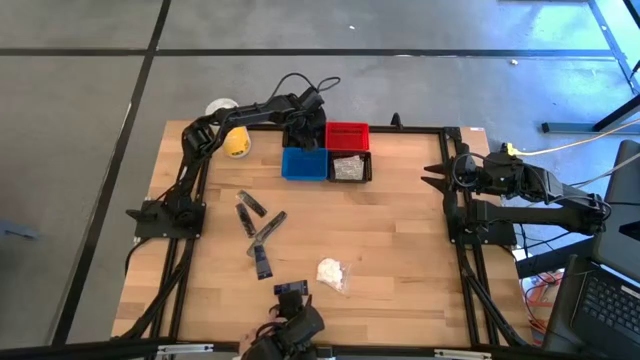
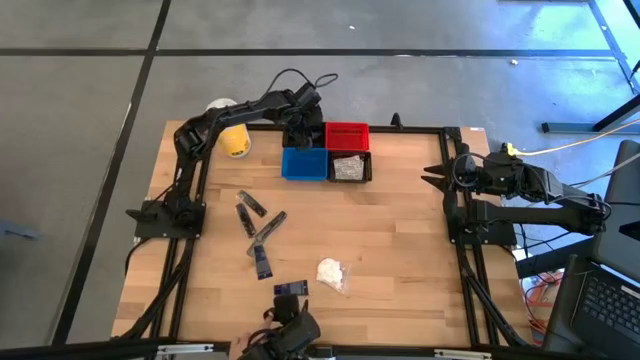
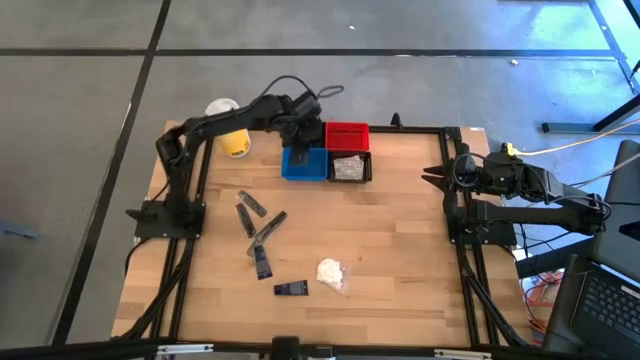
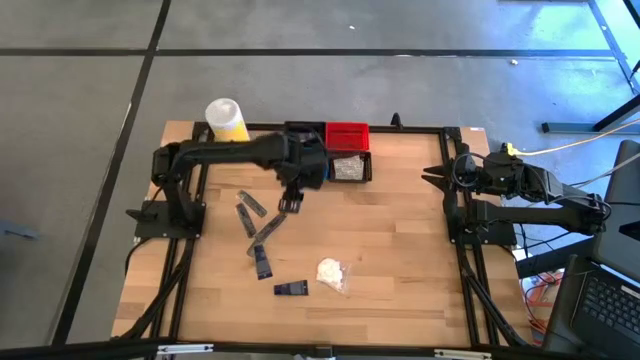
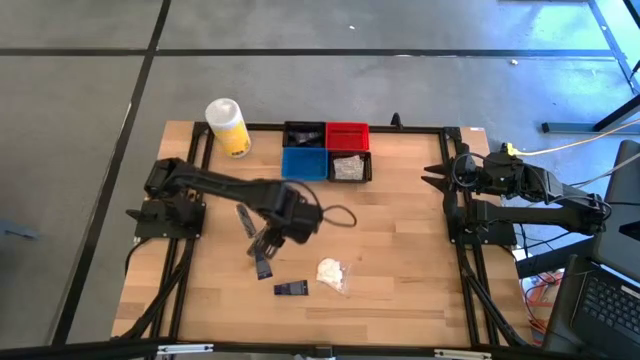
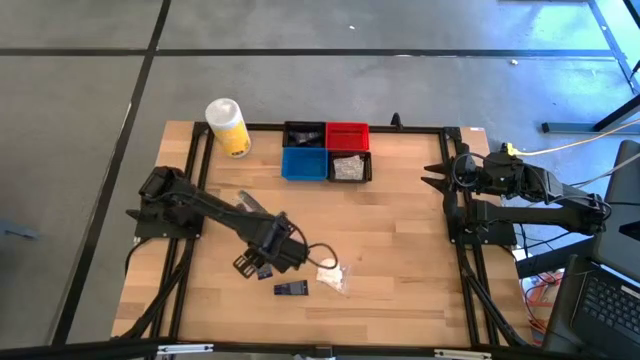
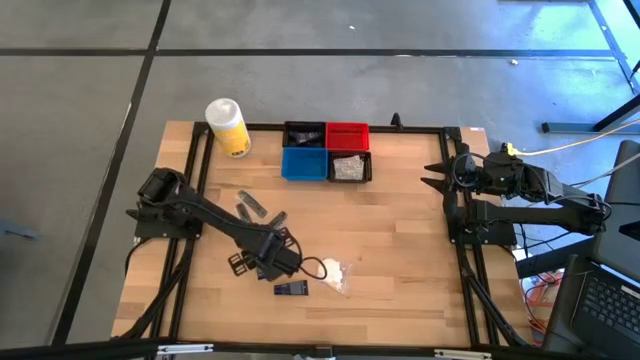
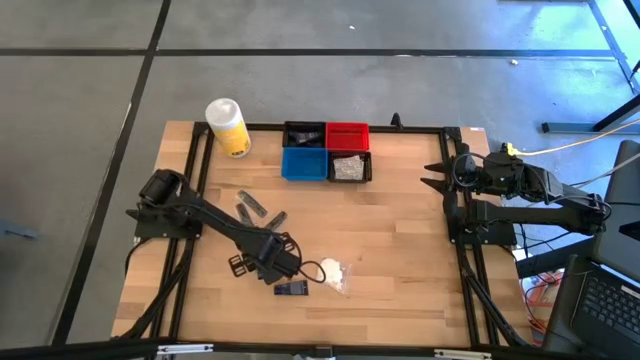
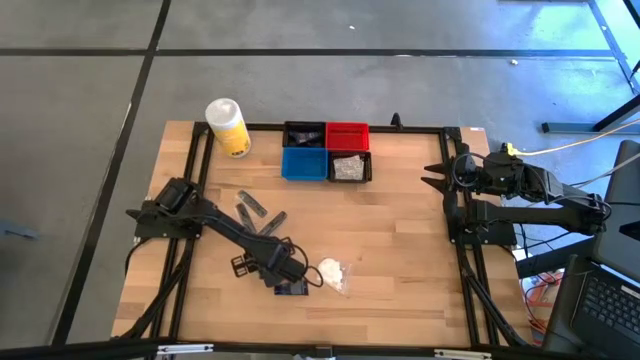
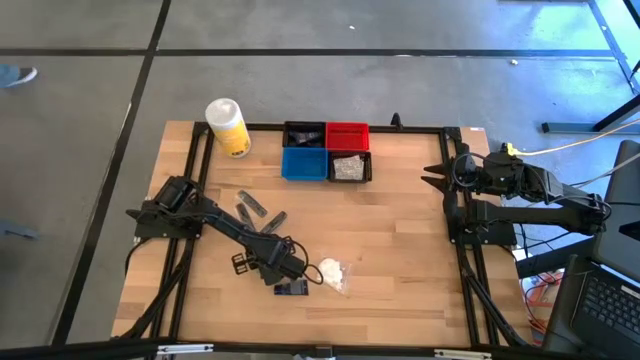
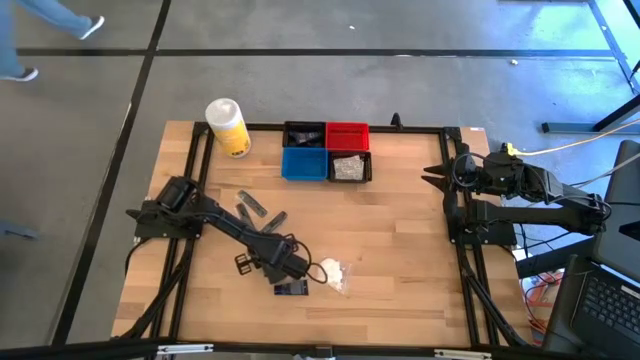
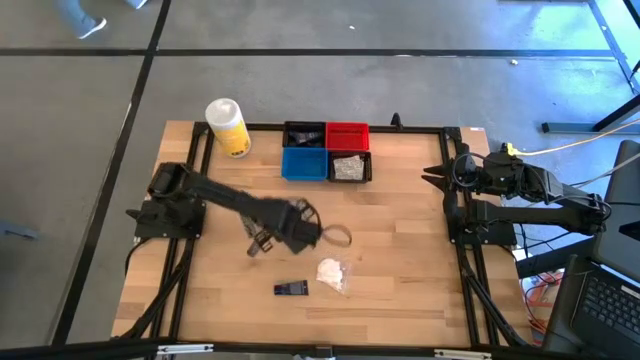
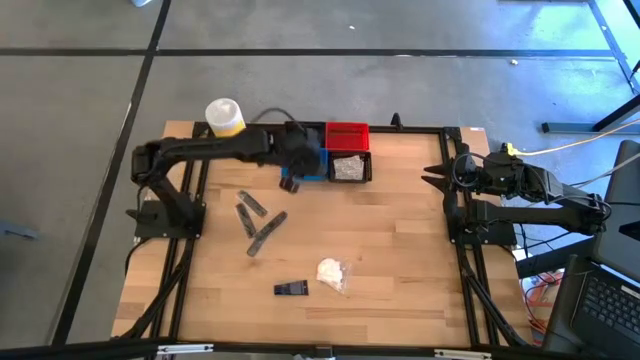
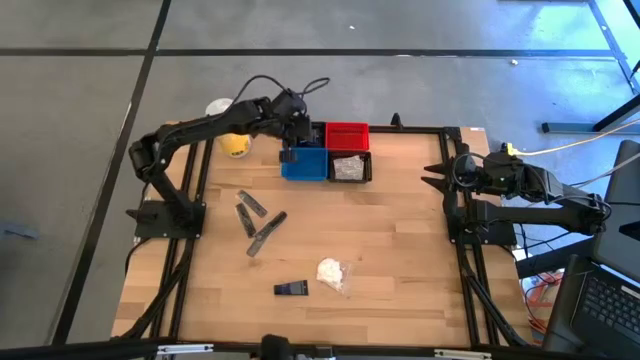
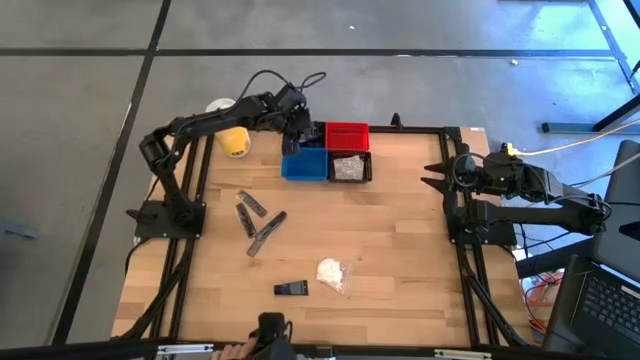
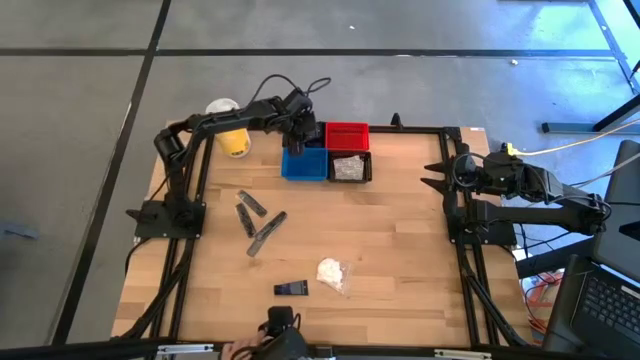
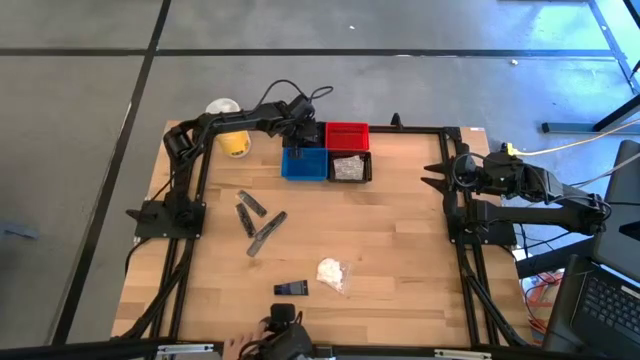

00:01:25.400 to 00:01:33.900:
Task: Pick & Place Travel size toiletries
Put the top shave cream into the top black bin

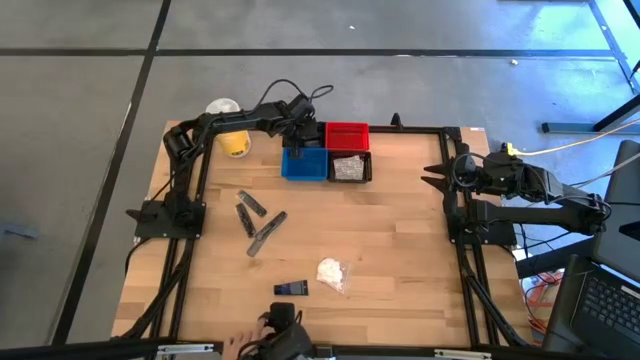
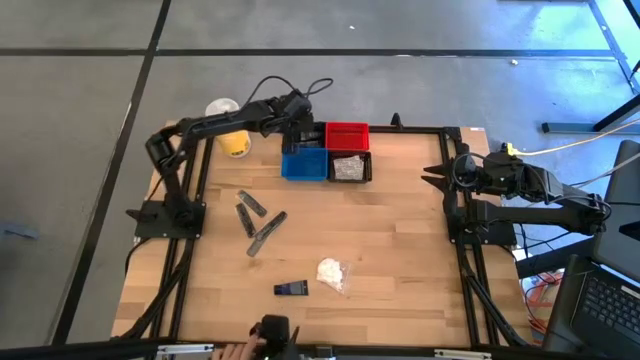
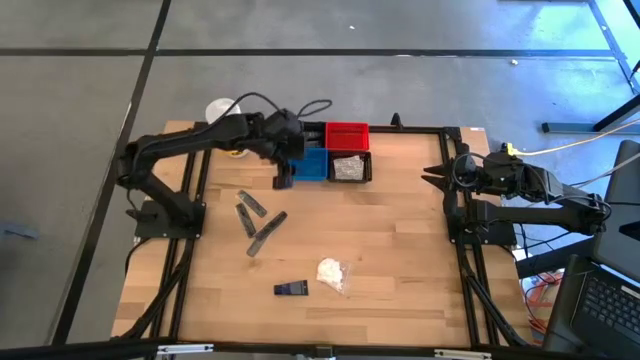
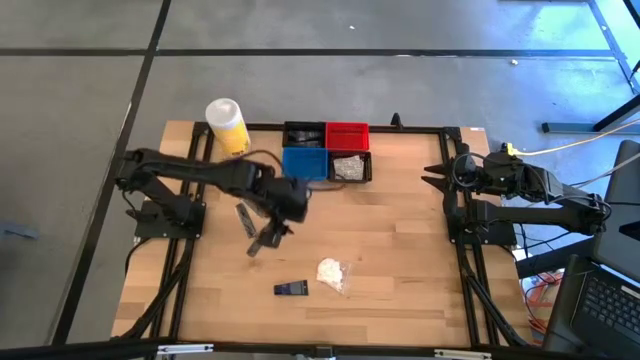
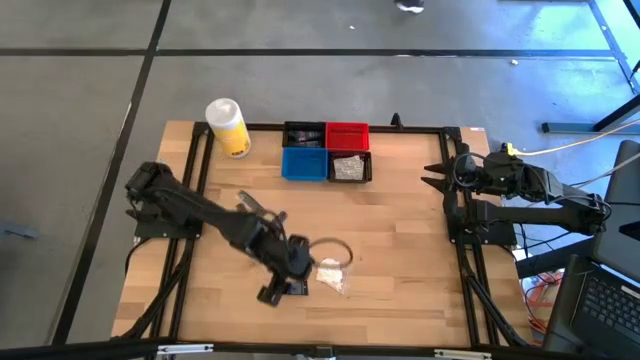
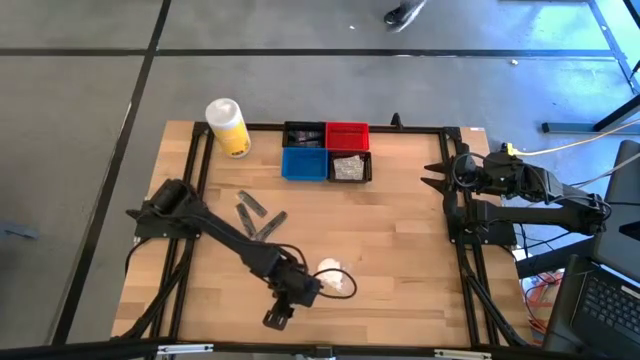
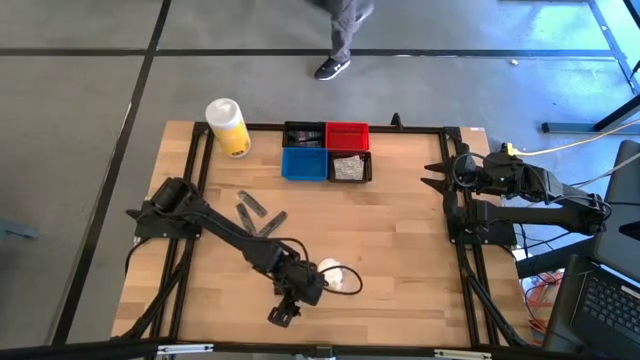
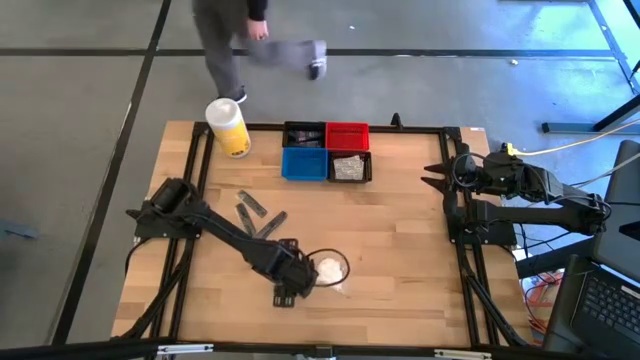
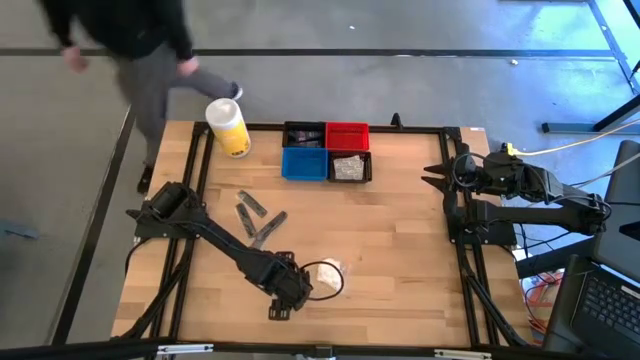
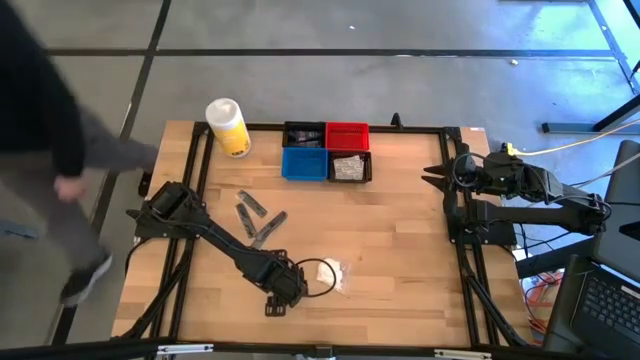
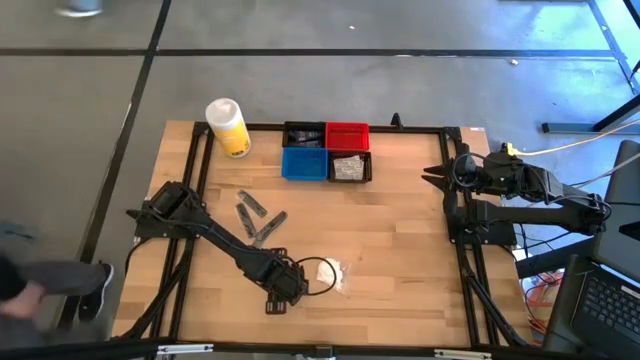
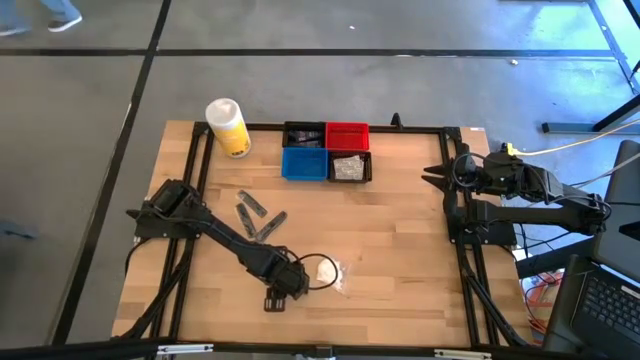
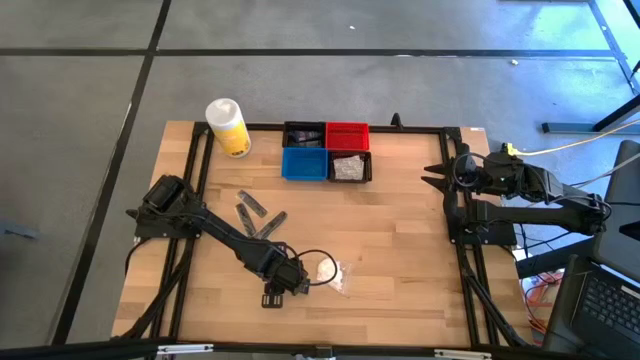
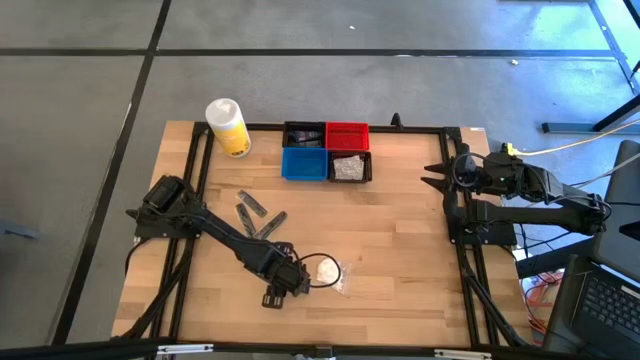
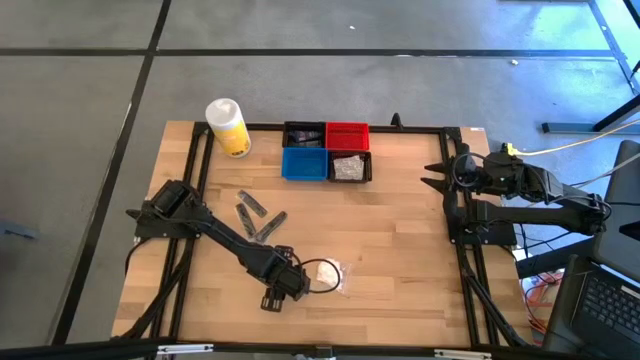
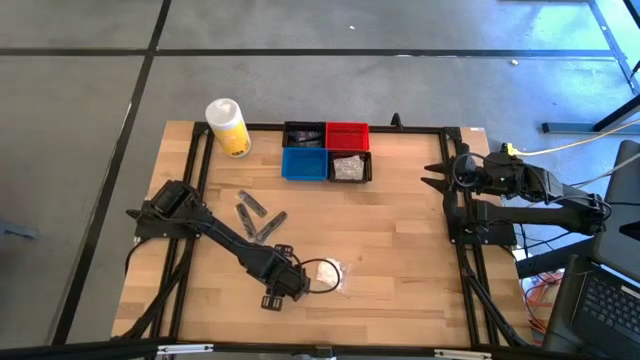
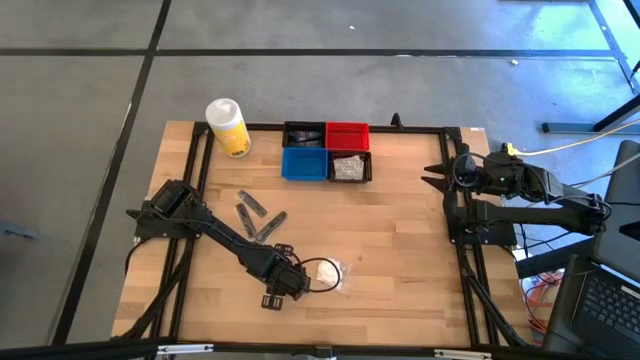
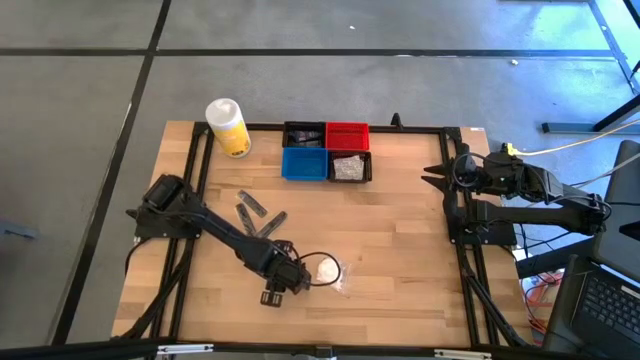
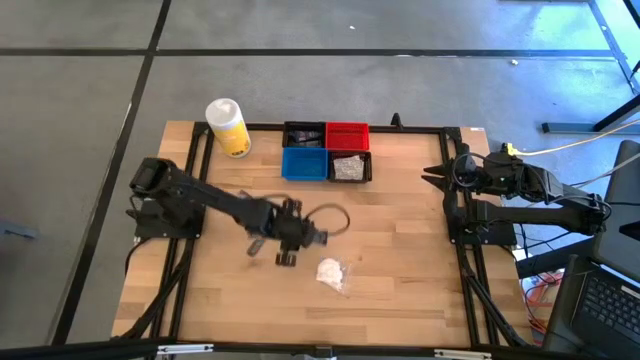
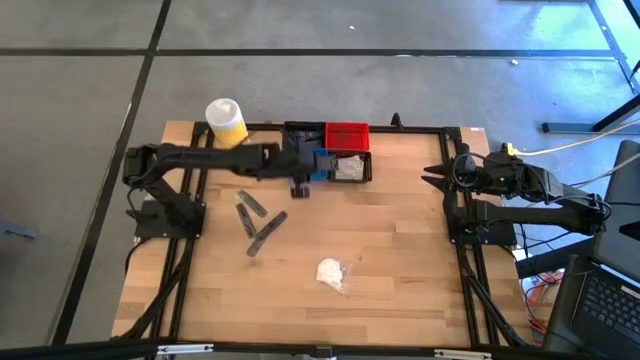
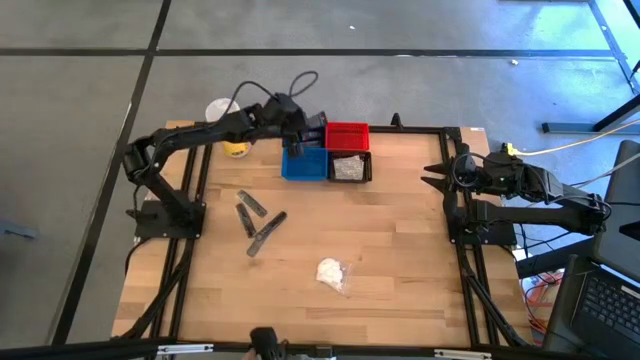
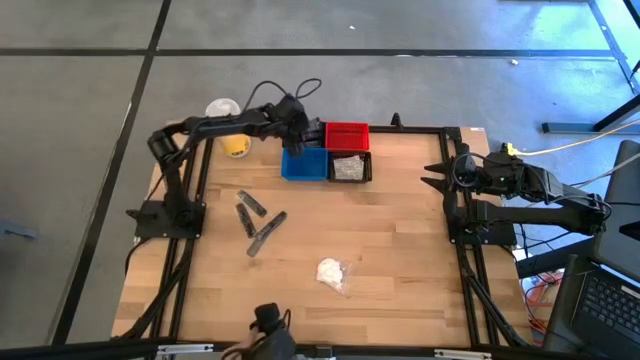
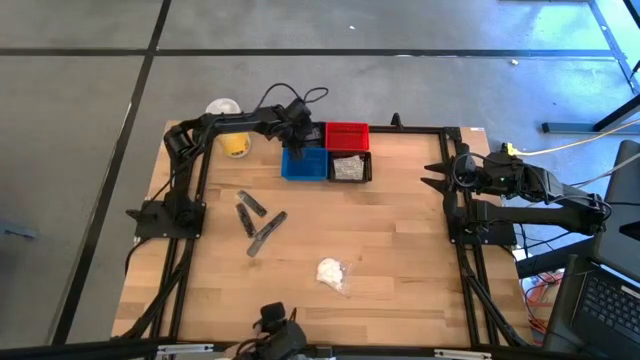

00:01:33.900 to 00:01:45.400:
Put the shave cream into the top black bin

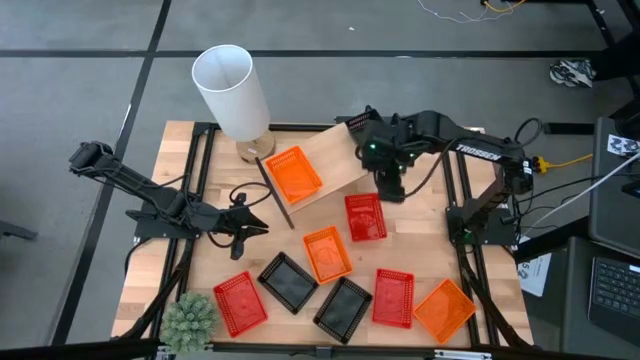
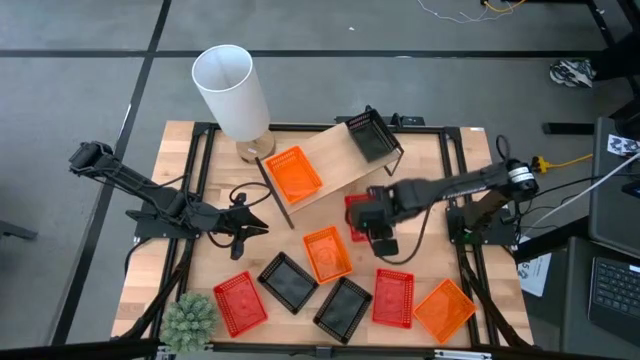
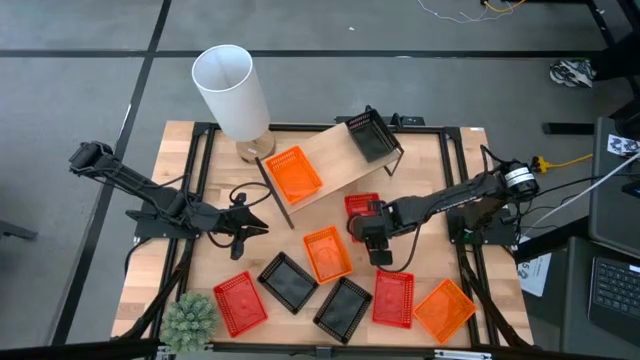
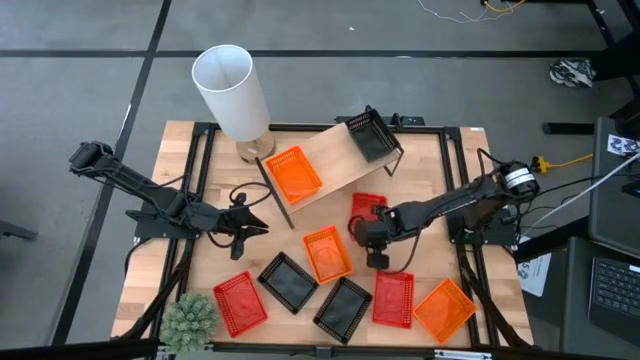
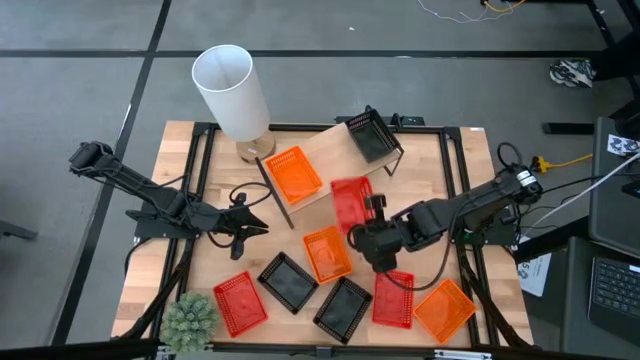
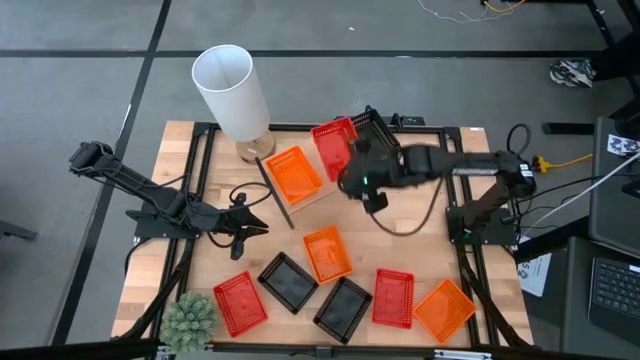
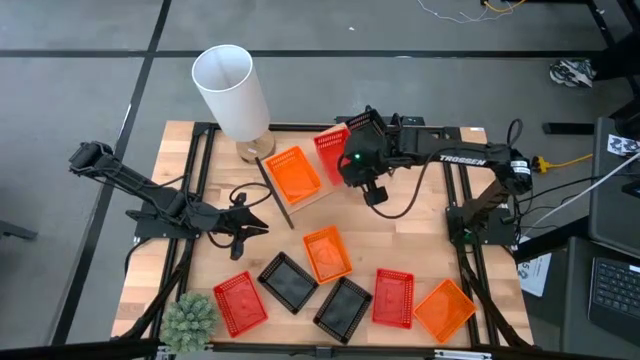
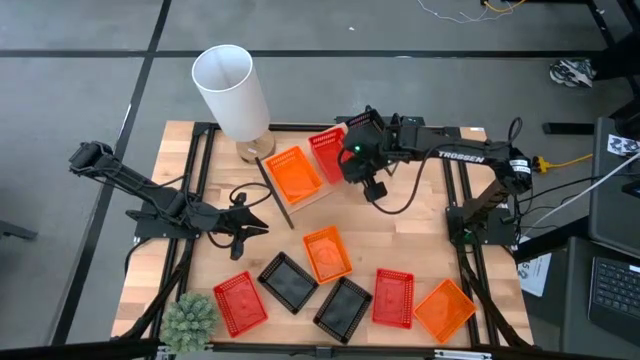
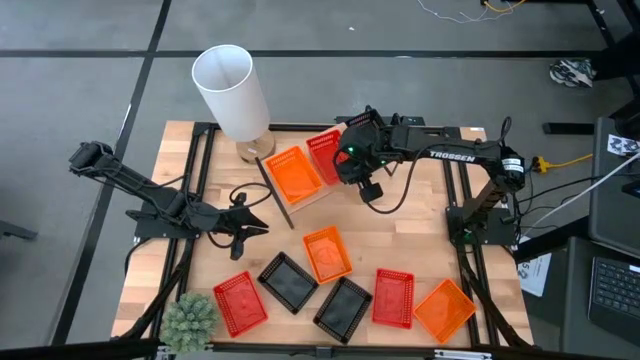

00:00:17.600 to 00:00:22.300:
Task: Stack baskets on shelf by color
Put the top red basket on the shelf
